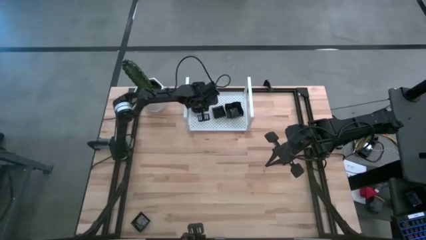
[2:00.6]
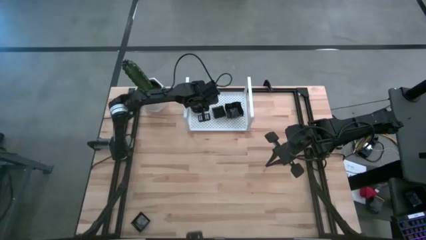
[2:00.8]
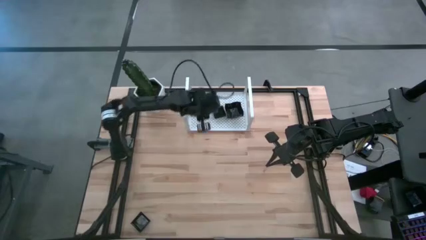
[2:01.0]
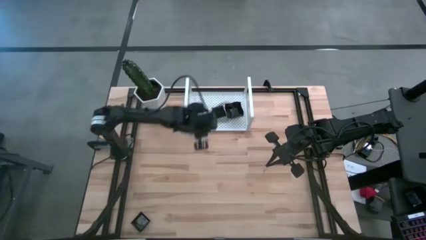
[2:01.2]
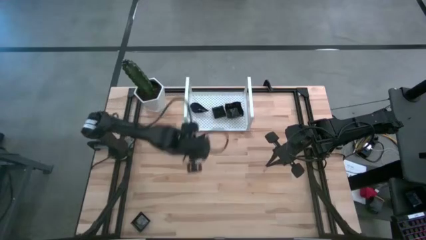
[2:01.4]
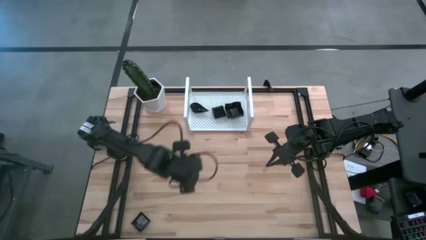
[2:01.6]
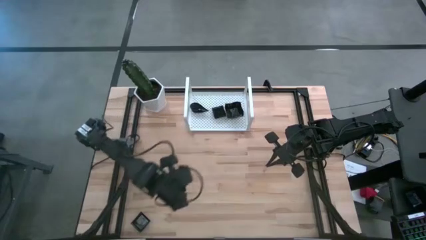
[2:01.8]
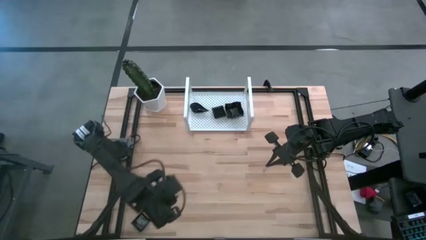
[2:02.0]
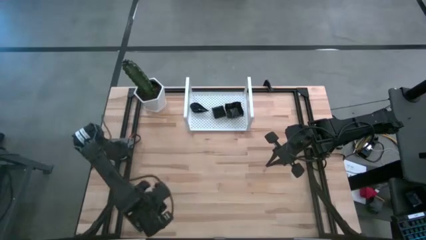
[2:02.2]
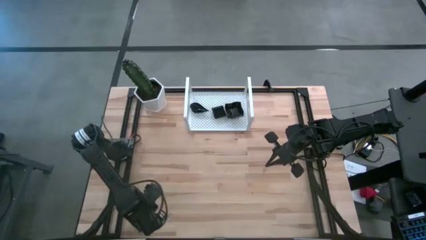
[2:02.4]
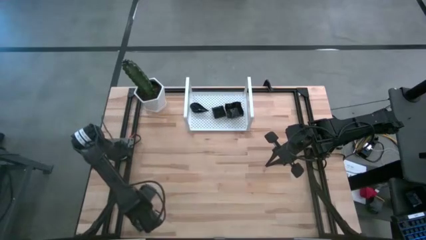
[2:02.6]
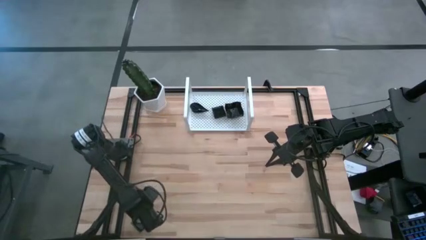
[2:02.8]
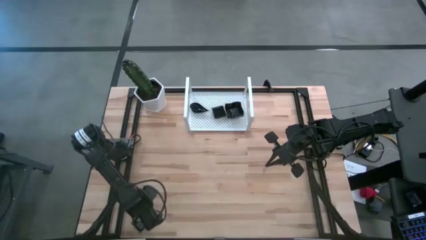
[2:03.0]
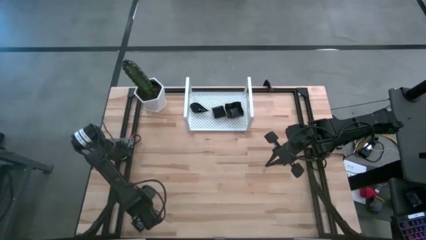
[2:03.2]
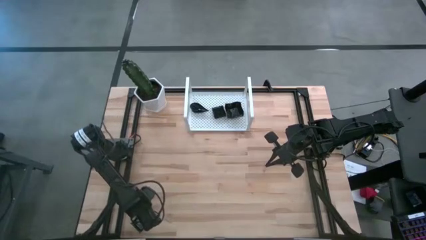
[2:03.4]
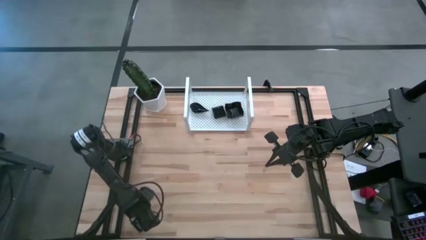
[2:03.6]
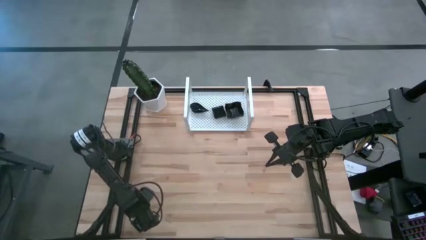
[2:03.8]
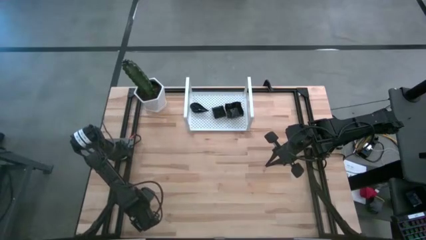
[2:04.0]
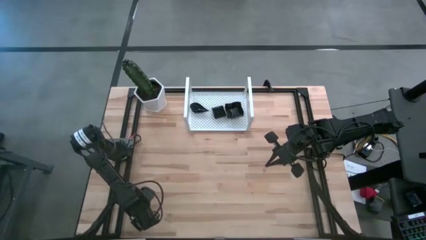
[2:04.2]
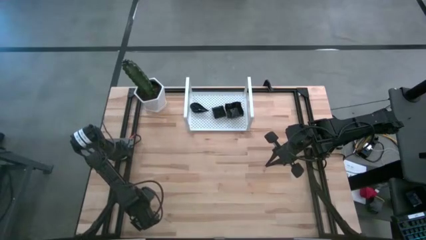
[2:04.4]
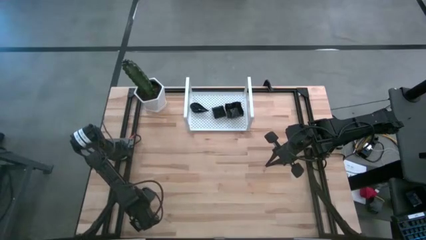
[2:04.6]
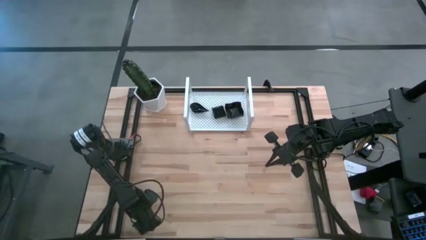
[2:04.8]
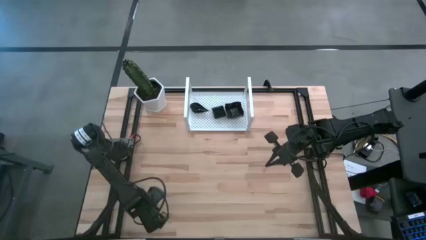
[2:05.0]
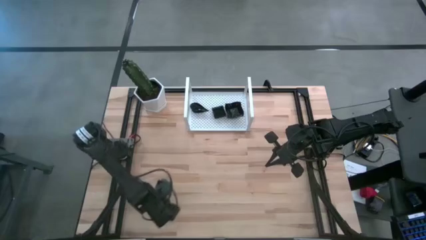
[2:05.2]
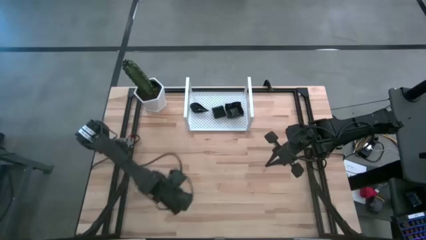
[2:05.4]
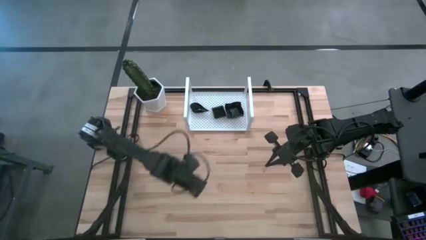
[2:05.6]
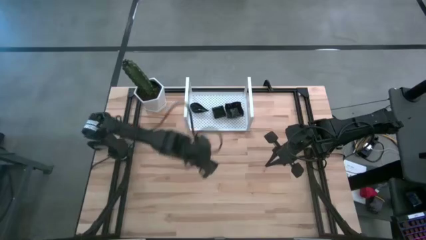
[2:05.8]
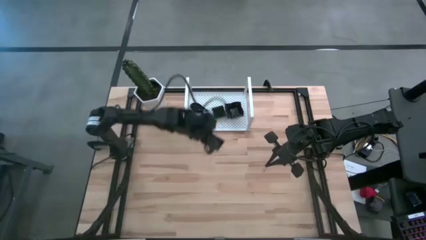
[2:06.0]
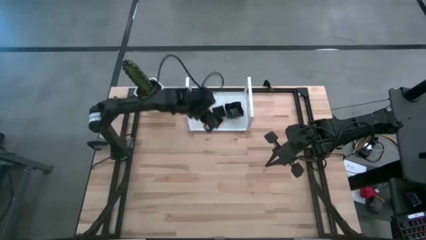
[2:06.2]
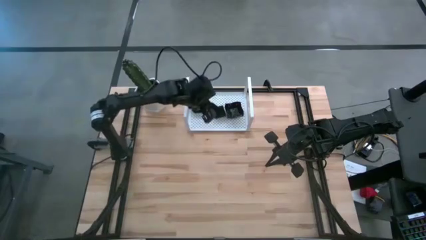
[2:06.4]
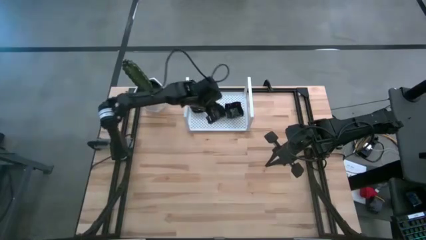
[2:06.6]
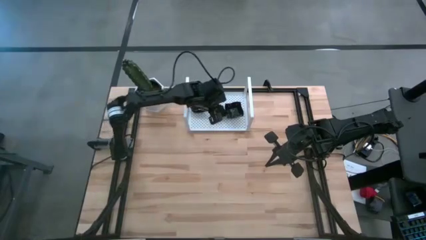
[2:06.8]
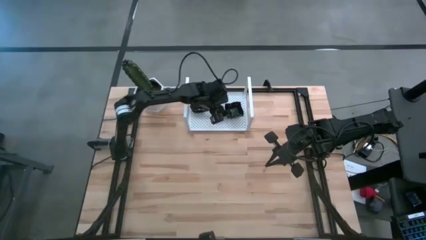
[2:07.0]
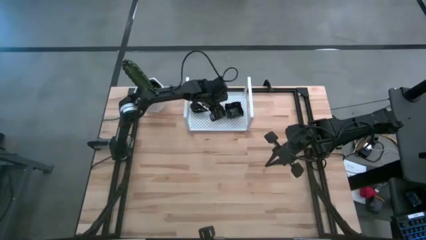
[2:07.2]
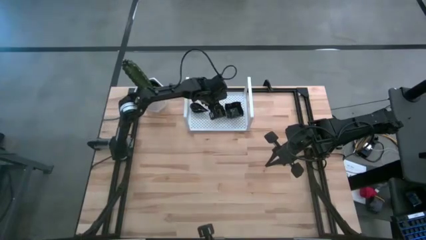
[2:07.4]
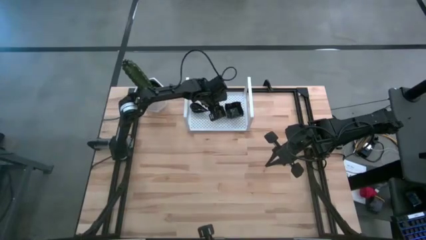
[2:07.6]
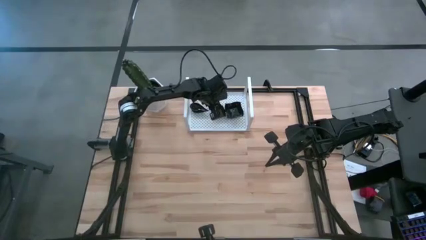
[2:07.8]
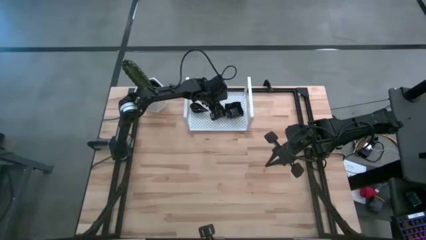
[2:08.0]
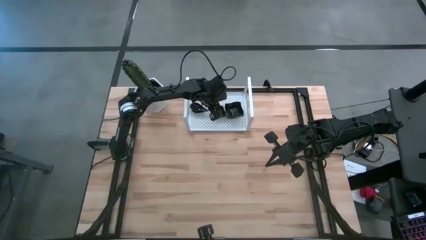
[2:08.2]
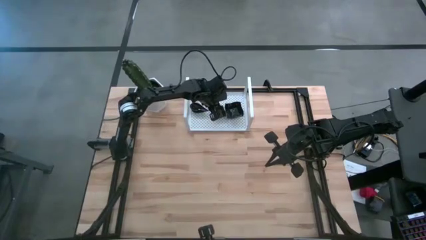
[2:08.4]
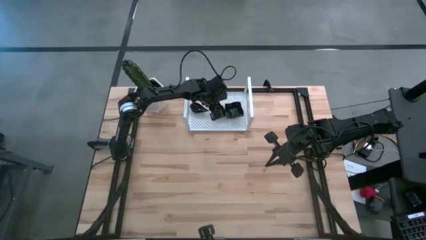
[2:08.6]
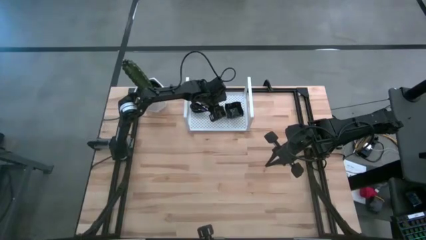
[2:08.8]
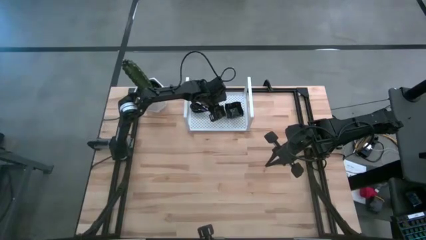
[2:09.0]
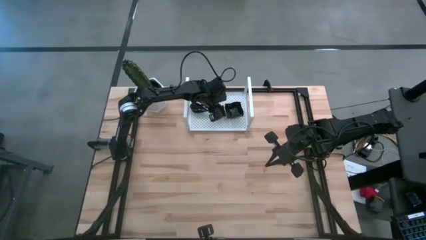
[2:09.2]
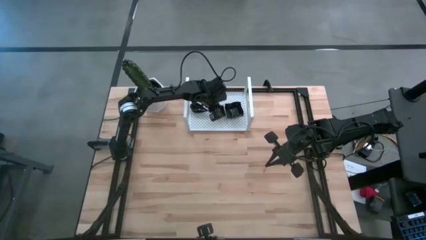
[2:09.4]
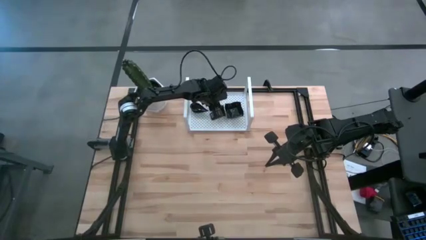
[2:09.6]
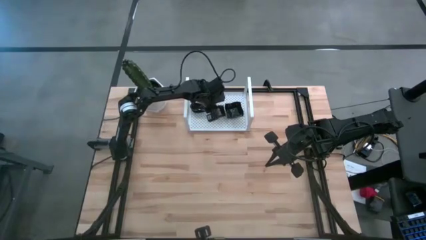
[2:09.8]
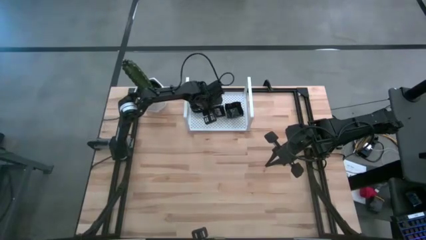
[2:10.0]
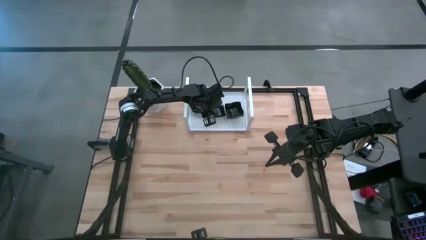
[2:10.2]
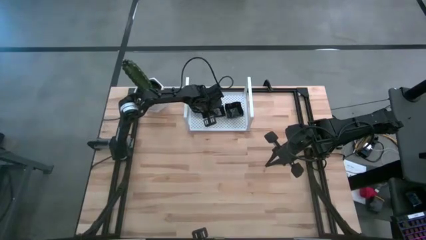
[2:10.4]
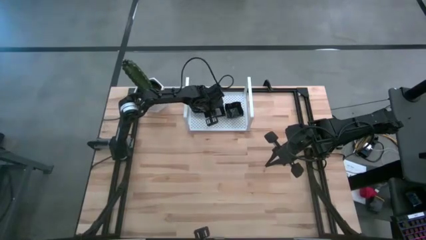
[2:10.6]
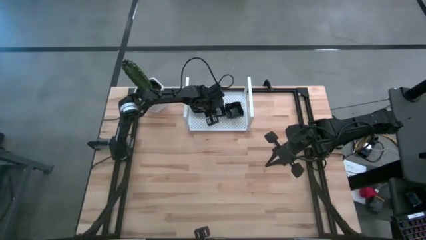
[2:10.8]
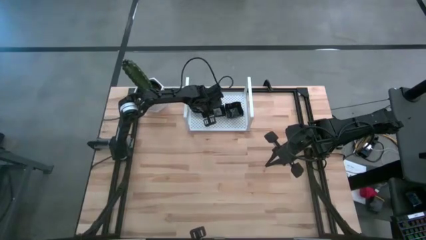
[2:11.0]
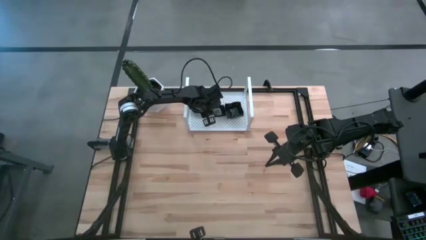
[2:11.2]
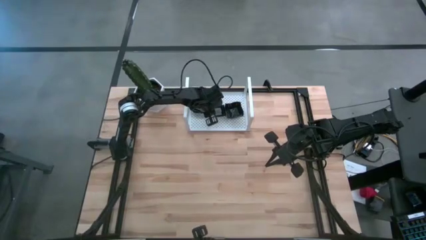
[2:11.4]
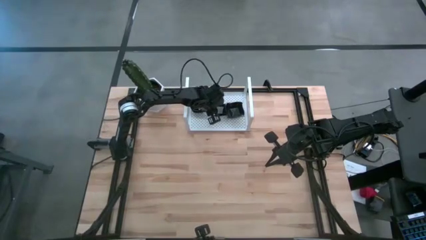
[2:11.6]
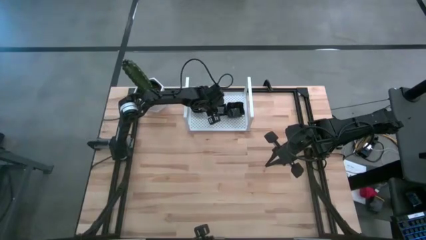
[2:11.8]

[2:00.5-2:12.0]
Task: Pick & Place Mini shaped plates
Stack the black square plate on top of the black square plate on the shelf

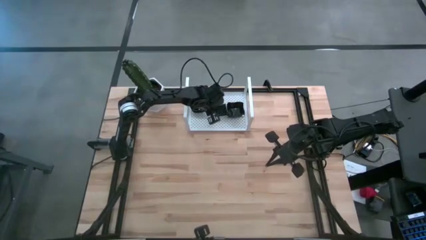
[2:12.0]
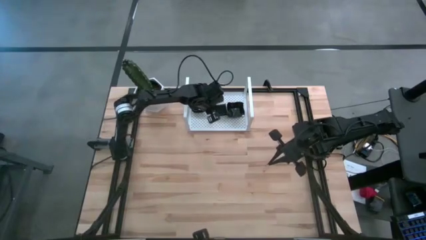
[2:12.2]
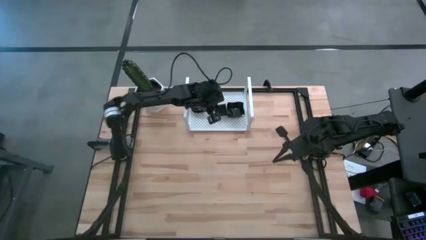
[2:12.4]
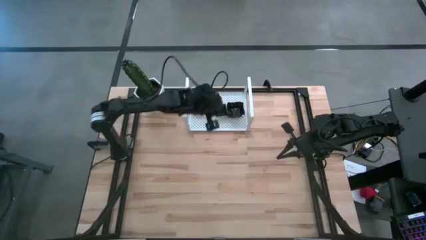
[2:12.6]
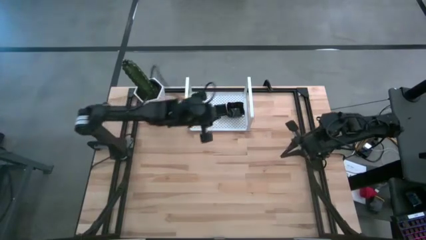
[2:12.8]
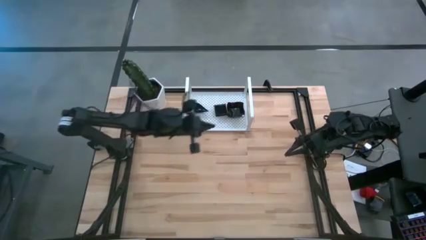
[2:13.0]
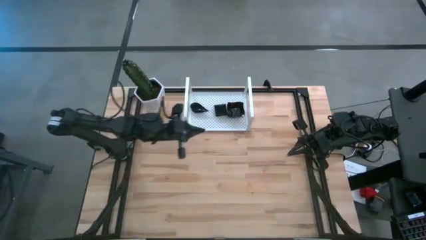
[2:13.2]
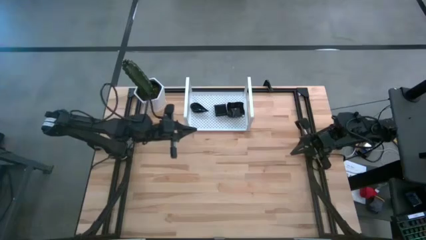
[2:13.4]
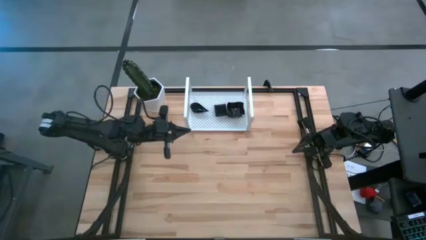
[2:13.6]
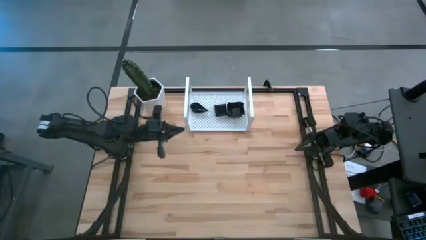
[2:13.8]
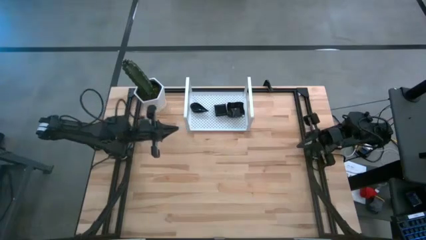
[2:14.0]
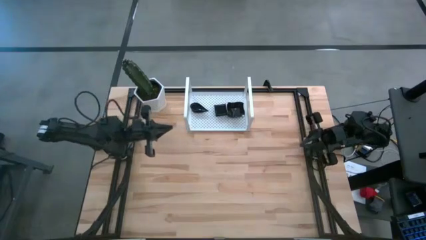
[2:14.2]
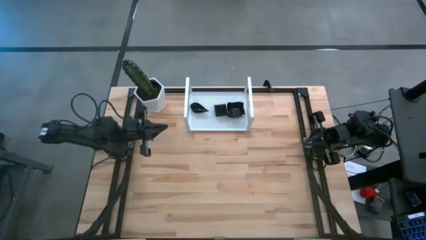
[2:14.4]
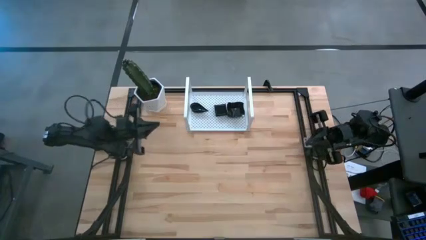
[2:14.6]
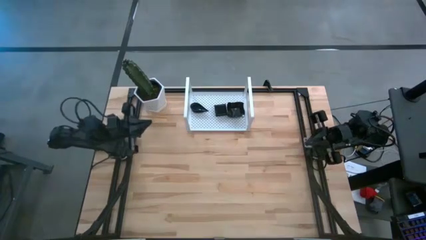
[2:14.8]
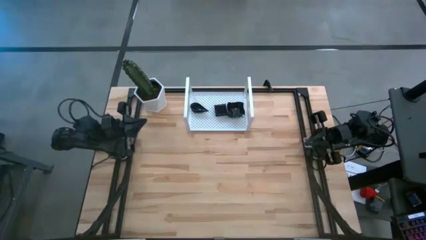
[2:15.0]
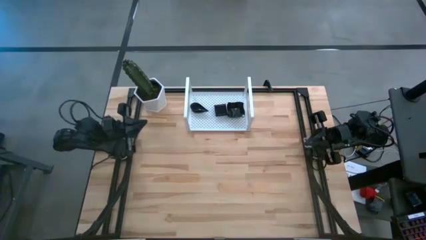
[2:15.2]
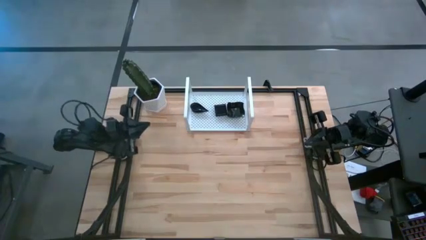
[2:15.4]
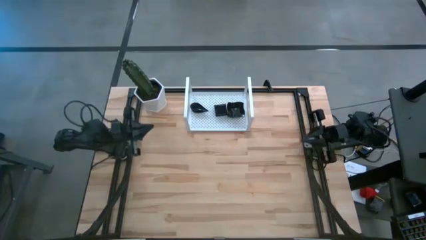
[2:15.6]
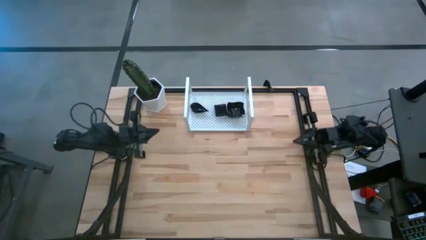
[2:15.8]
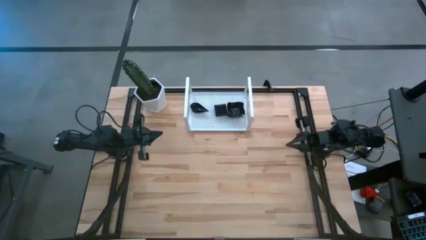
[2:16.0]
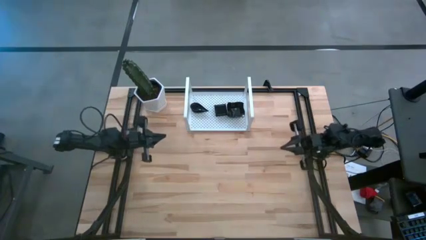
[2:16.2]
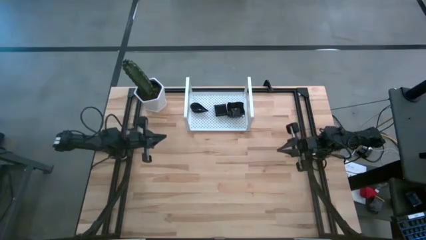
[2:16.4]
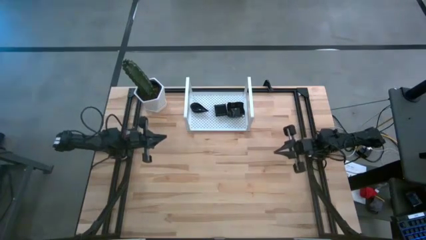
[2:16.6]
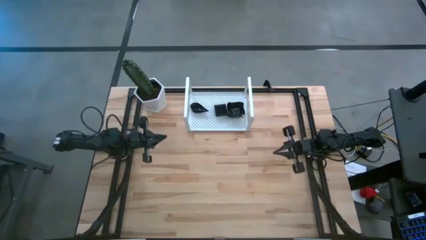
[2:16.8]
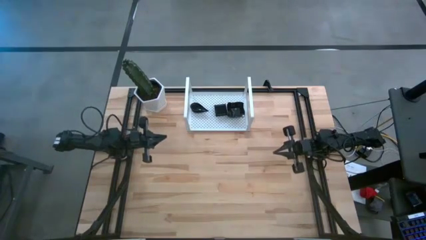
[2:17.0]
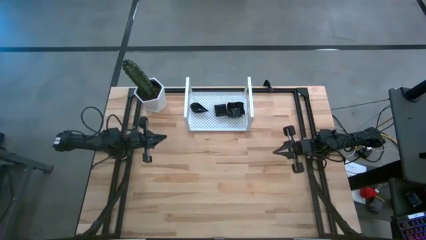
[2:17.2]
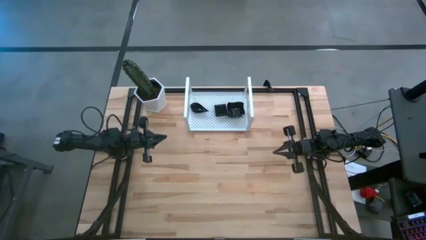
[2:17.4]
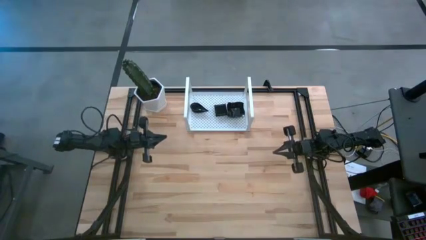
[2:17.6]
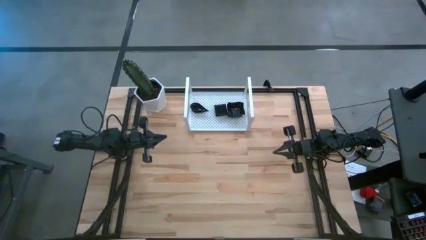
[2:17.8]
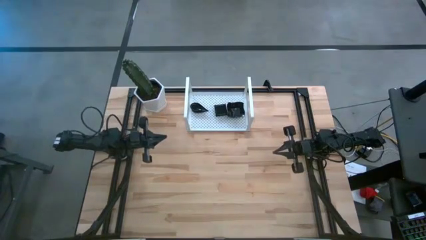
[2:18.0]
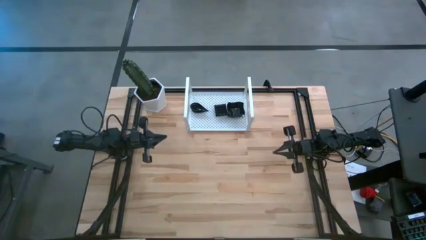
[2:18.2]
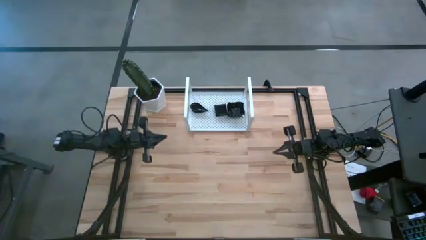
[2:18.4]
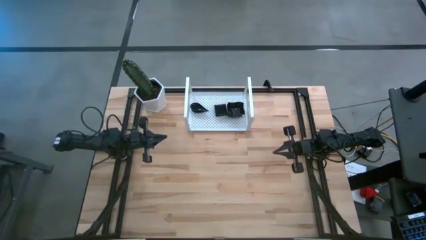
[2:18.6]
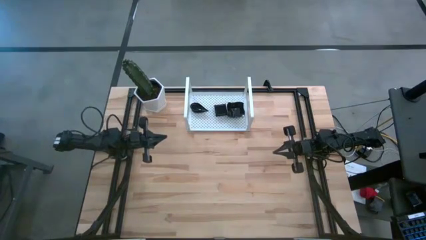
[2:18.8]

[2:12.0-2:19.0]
Return to Home Position
